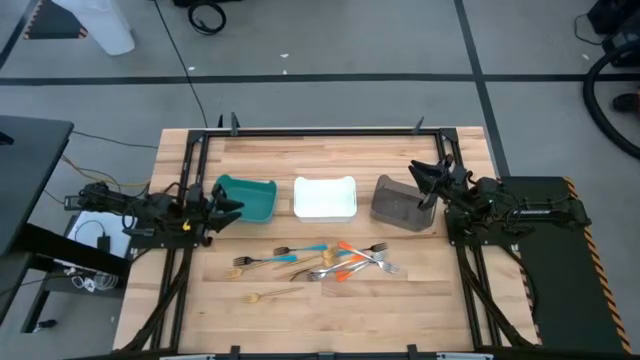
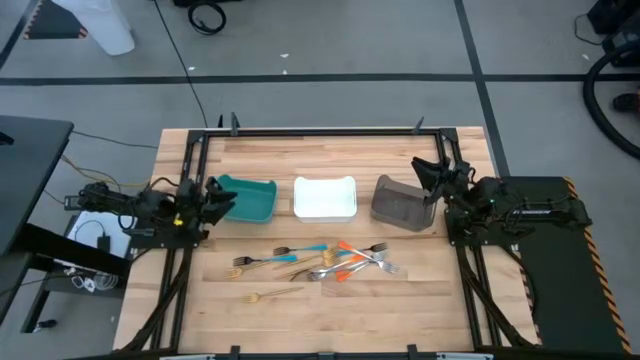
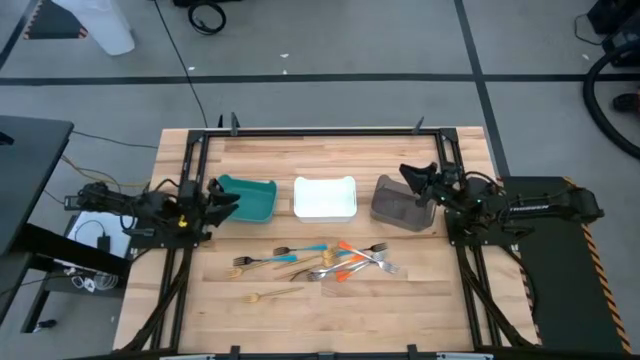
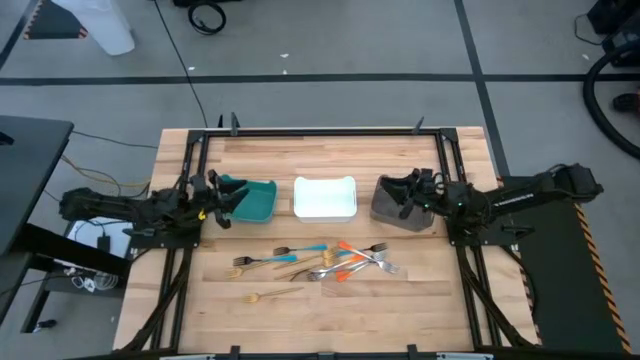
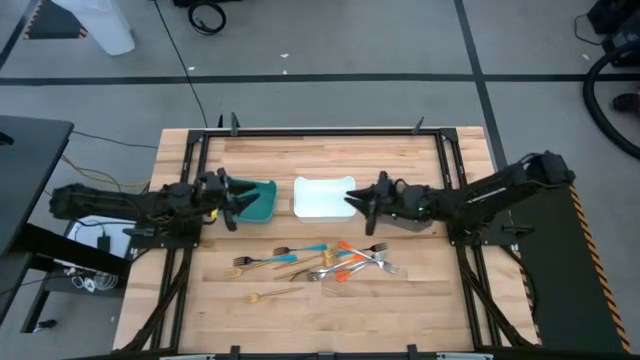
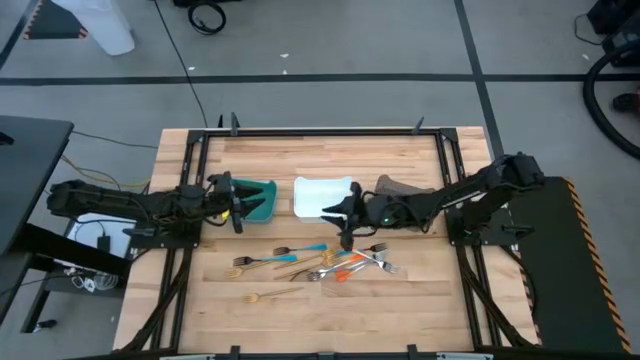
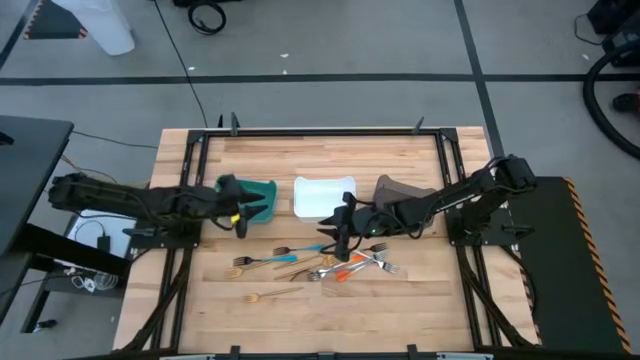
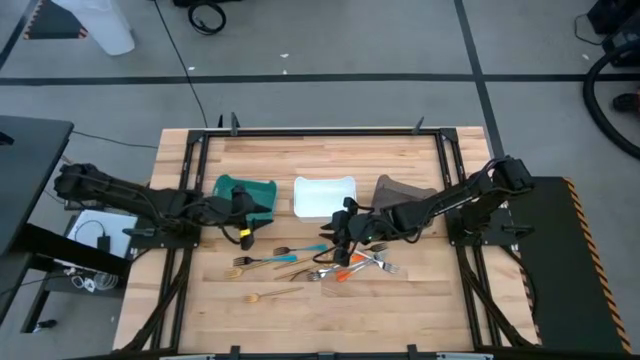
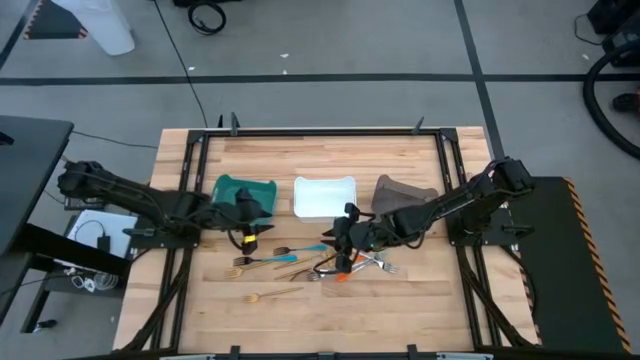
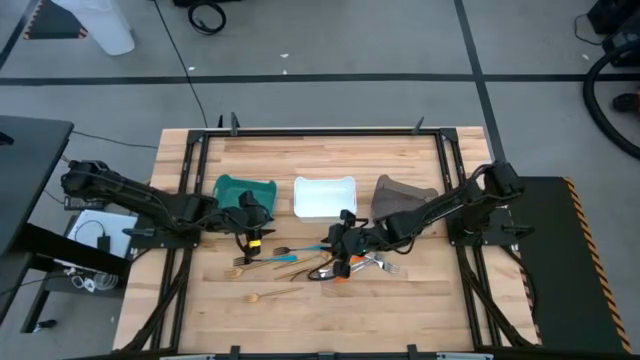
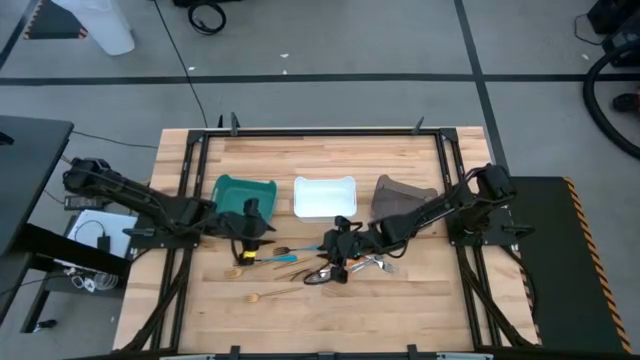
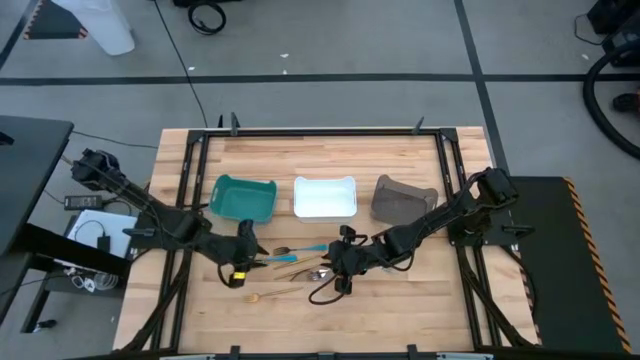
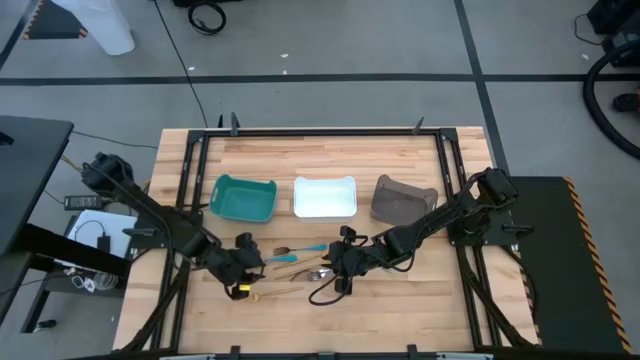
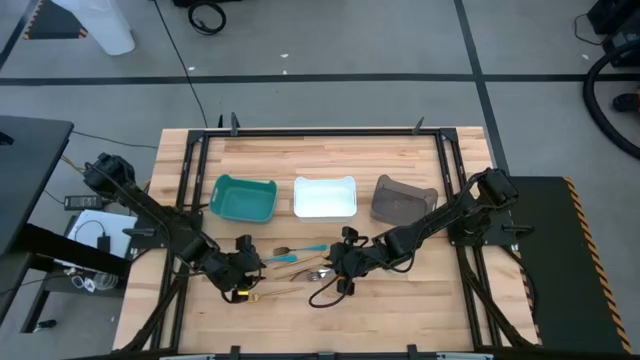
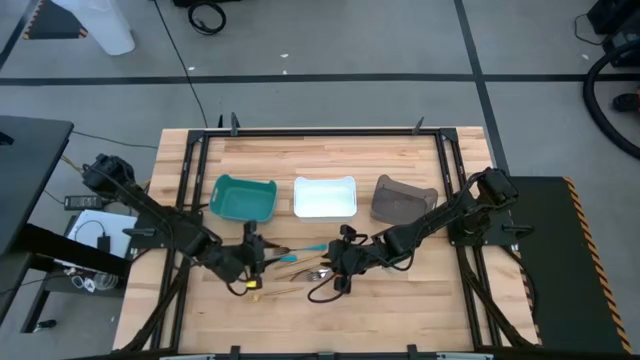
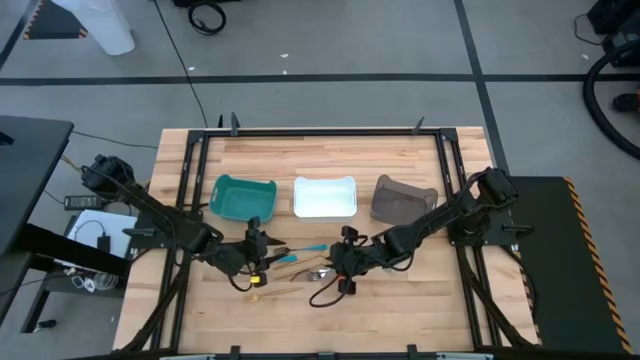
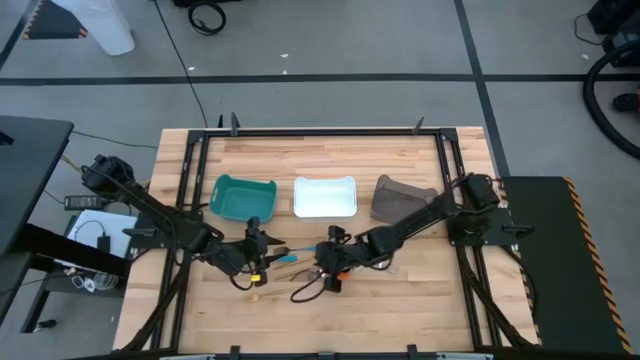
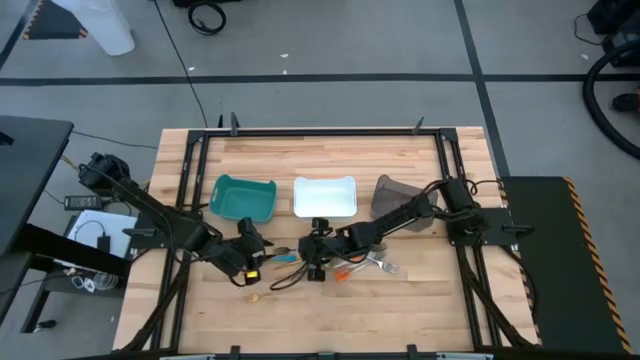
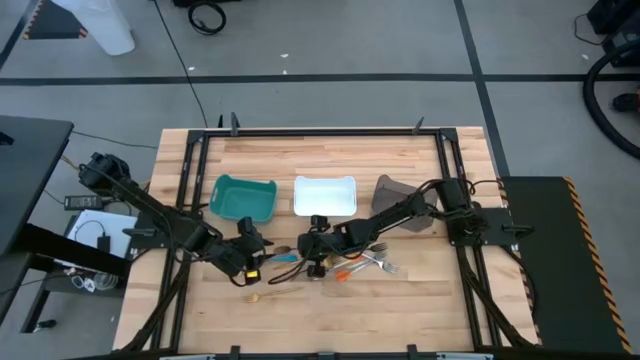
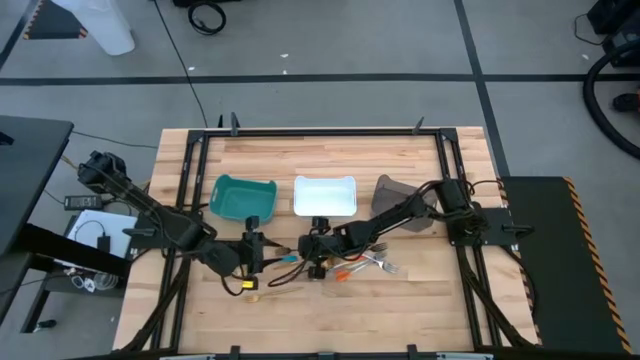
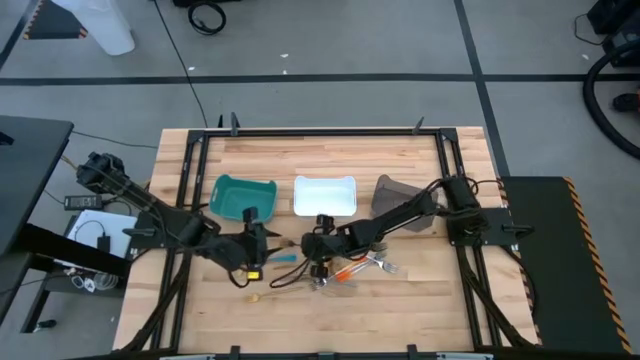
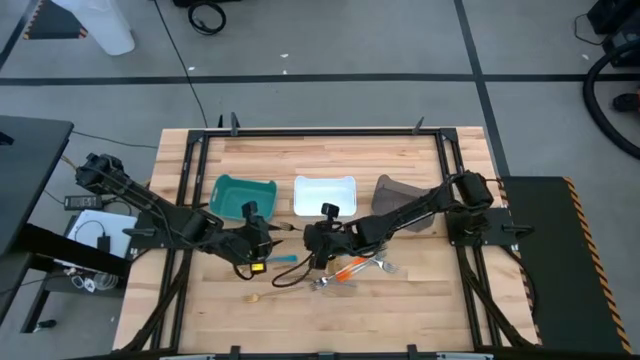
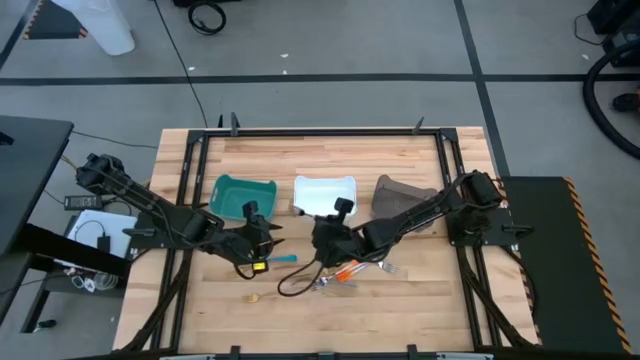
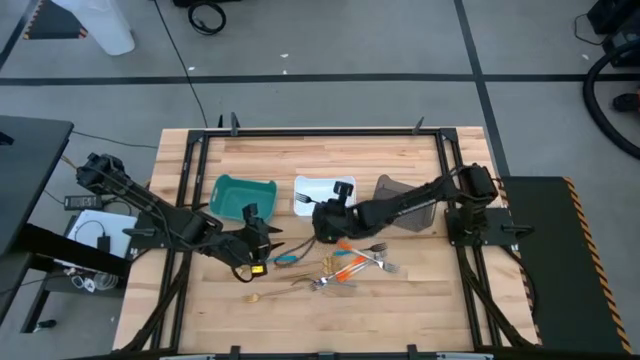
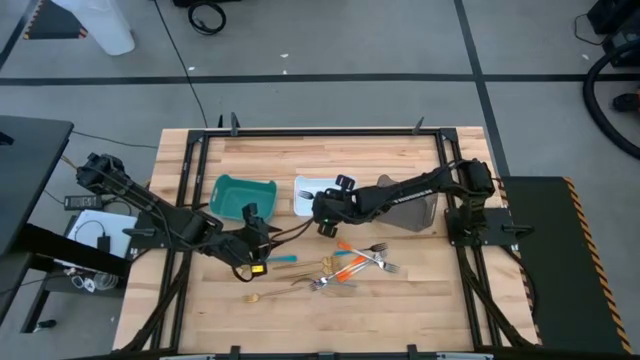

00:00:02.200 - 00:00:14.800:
Task: Sort silverware by color (type)
Put the blue fork into the white bin

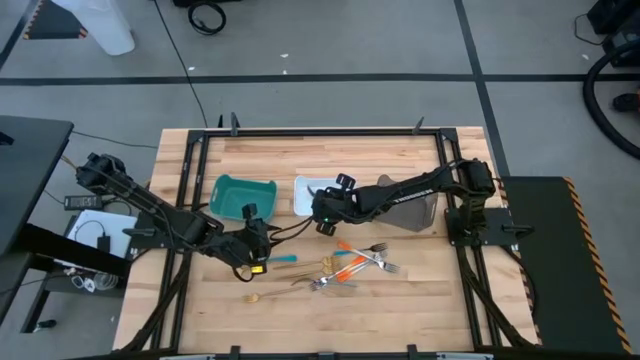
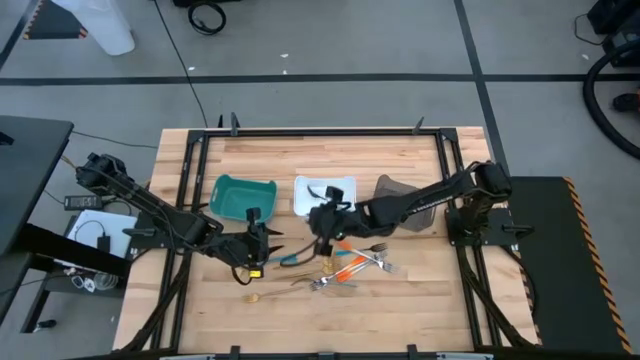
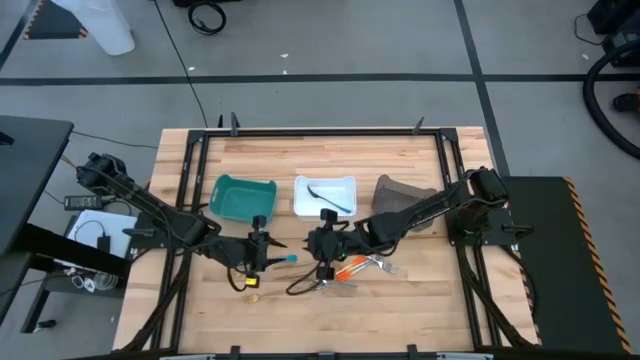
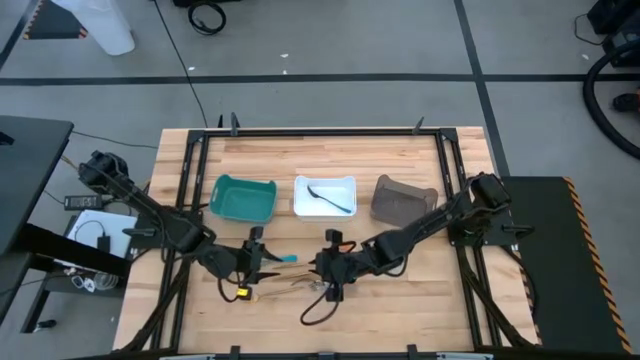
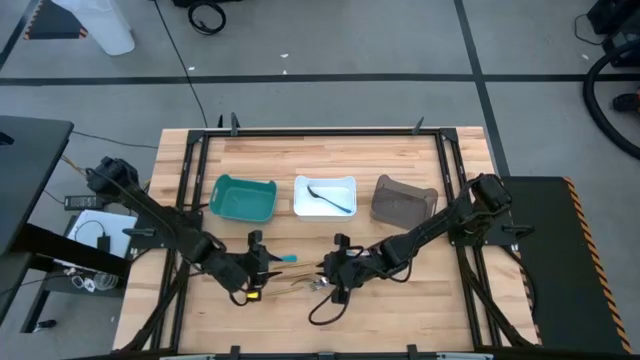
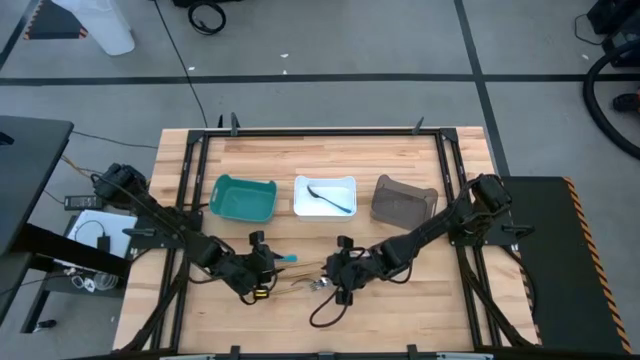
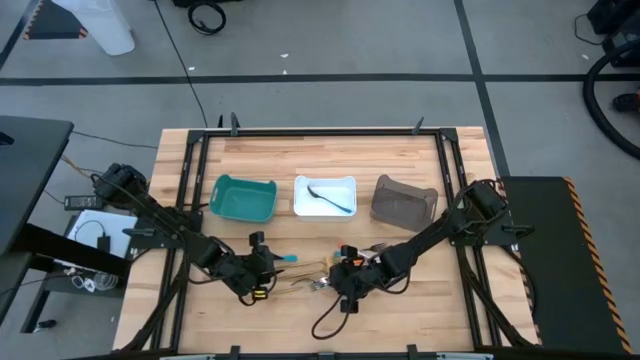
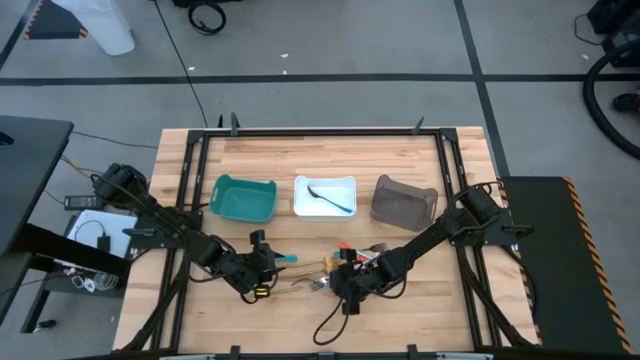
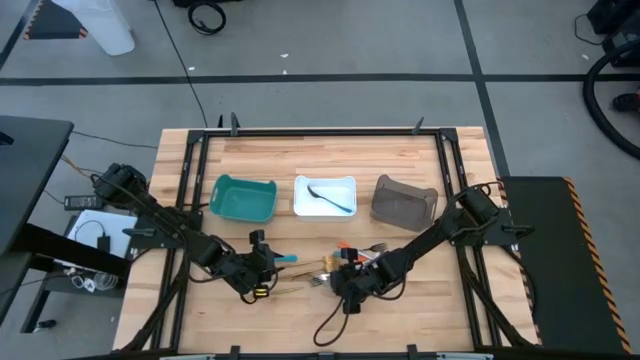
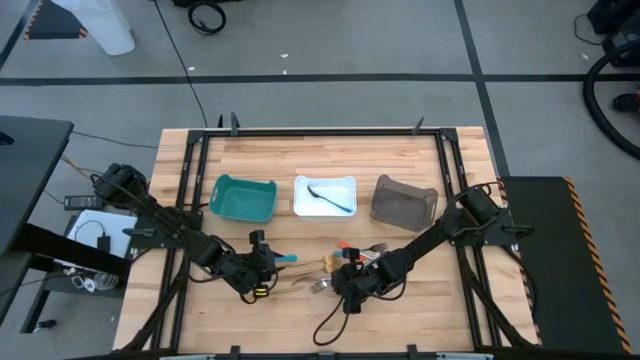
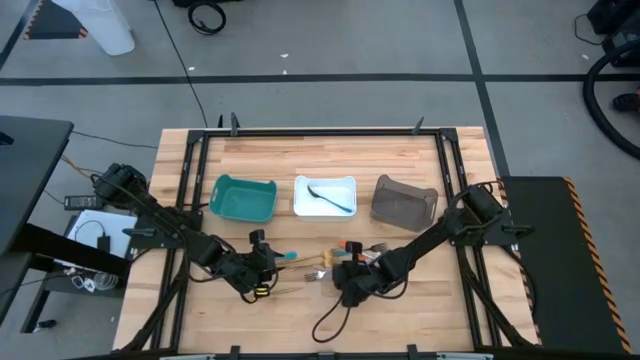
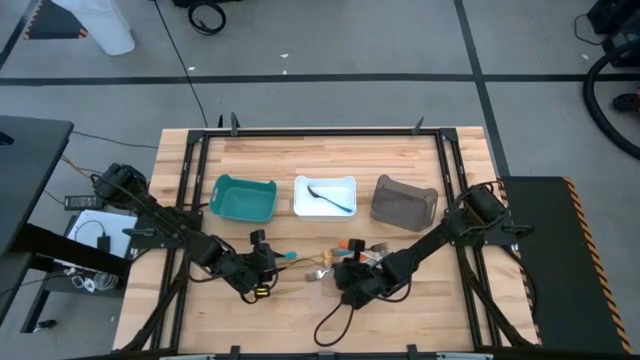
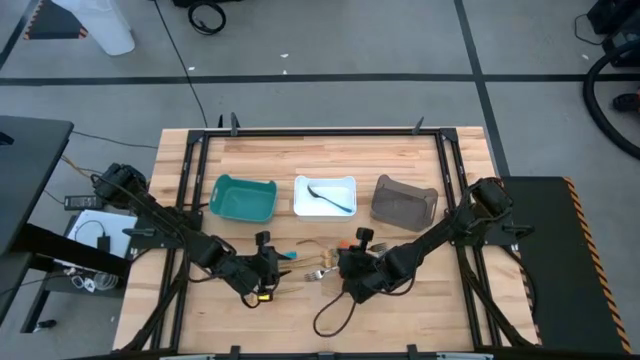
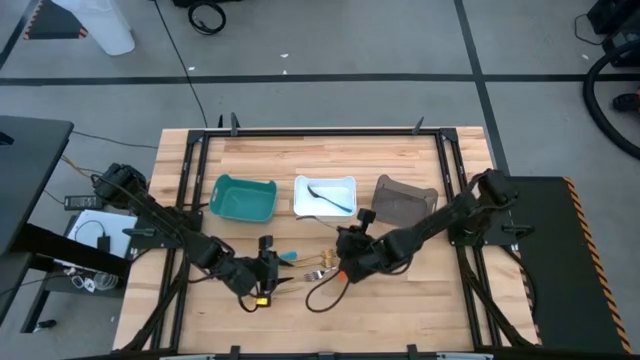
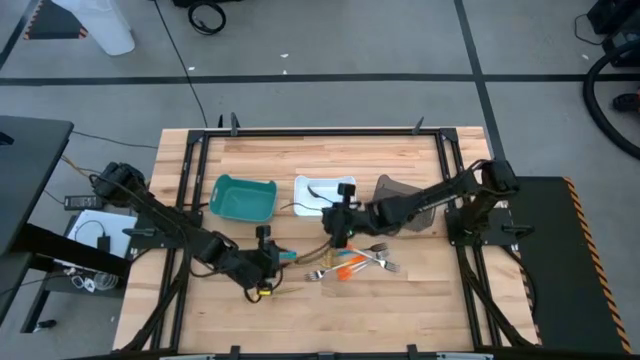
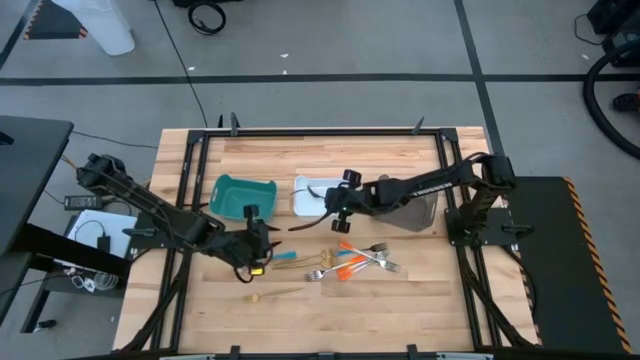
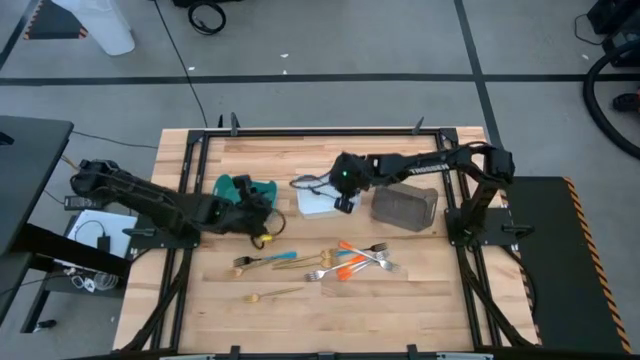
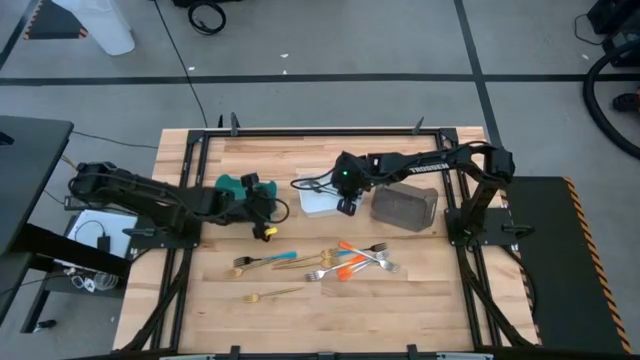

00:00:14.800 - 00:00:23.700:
Put the blue fork into the white bin
